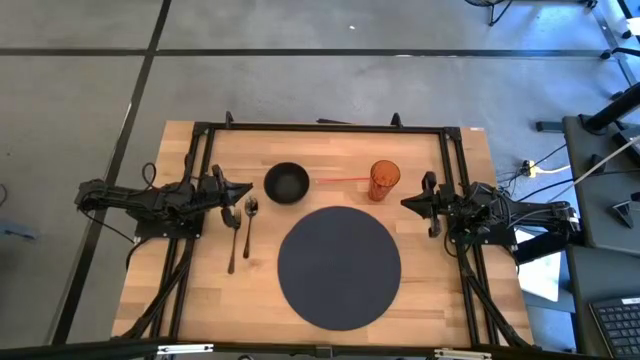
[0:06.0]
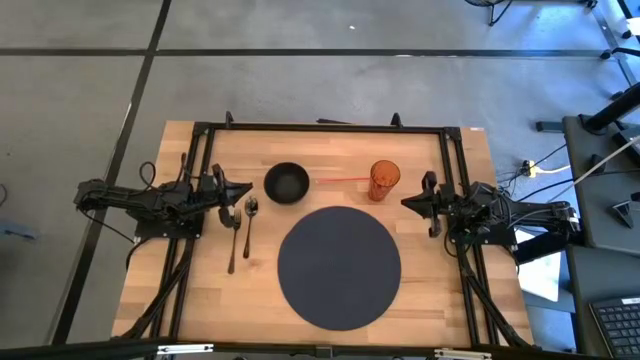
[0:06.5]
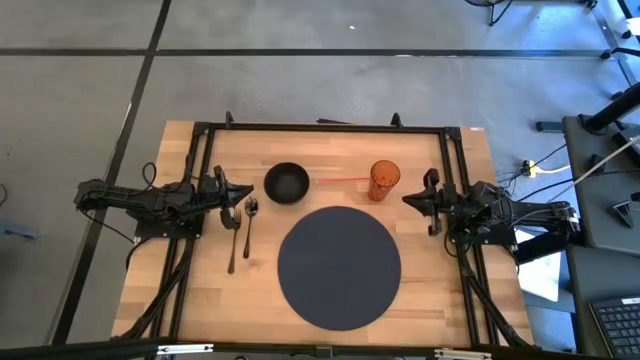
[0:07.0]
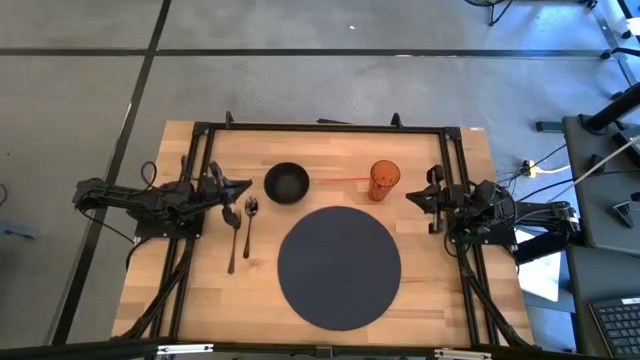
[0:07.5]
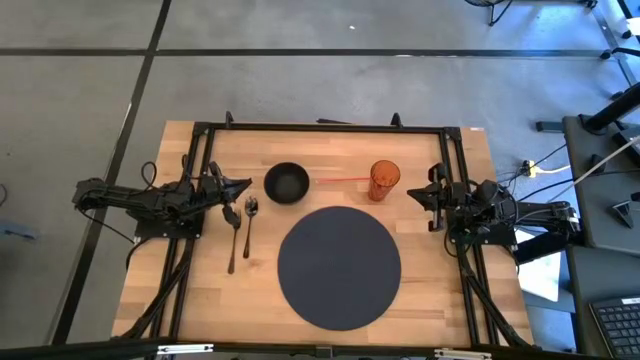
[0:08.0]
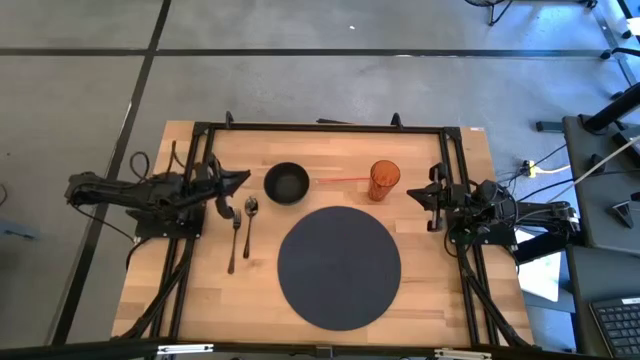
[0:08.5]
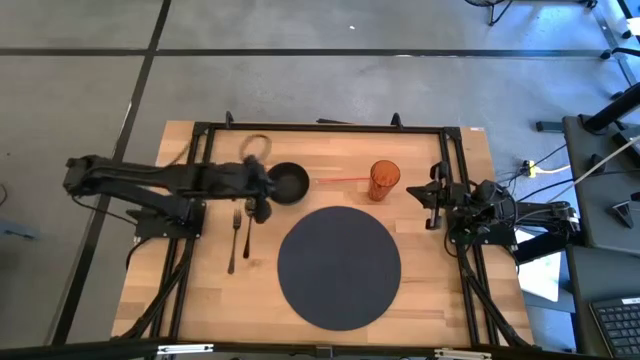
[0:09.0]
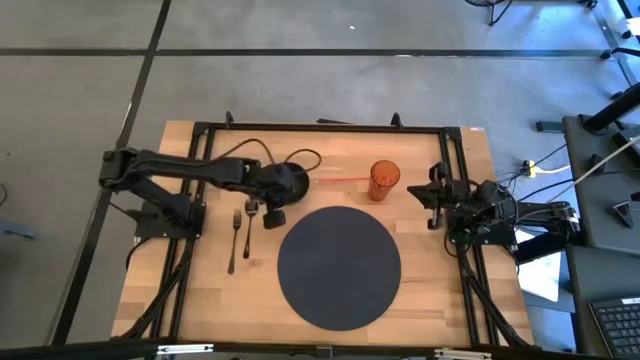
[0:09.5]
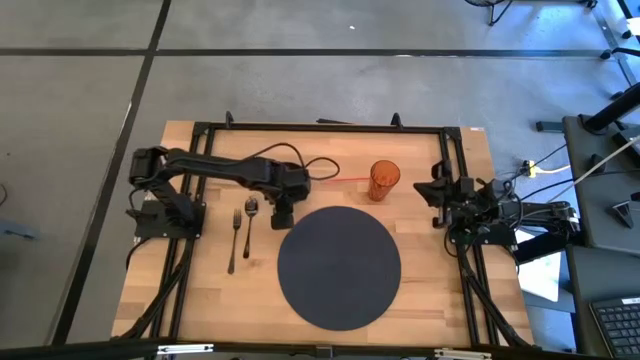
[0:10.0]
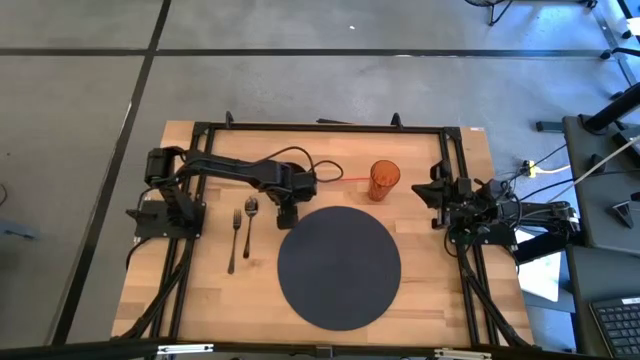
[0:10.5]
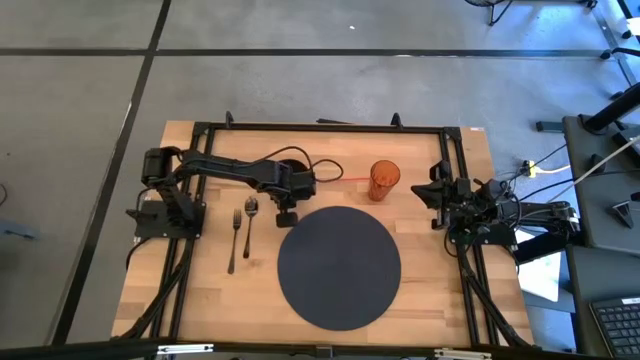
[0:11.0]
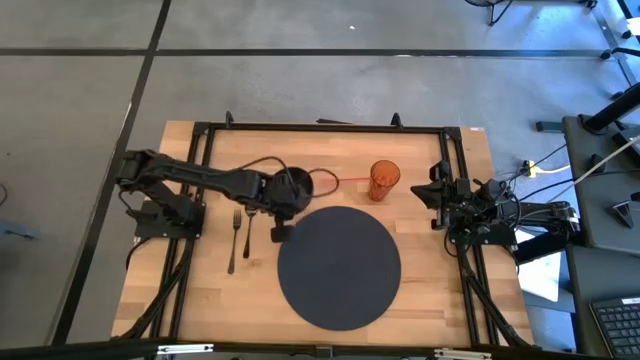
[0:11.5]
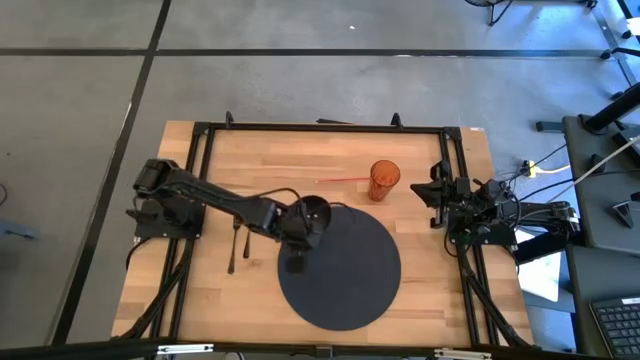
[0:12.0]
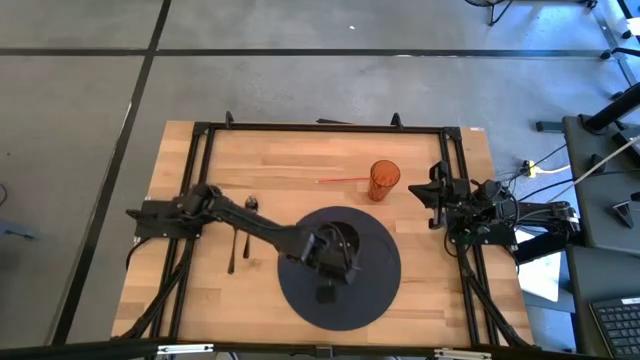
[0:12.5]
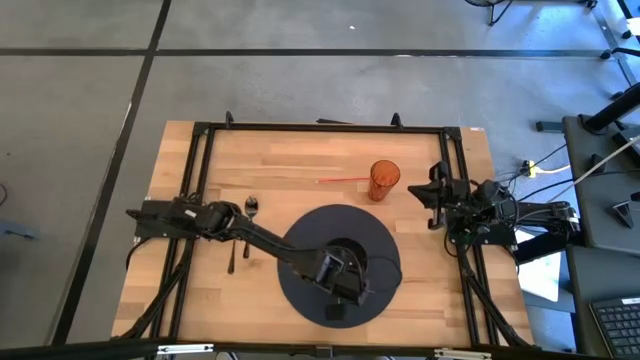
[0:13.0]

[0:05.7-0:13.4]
Task: Pick & Place Utensil
Put the black bowl on the blue mat

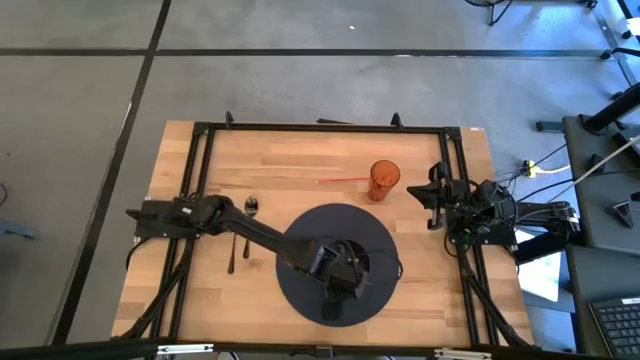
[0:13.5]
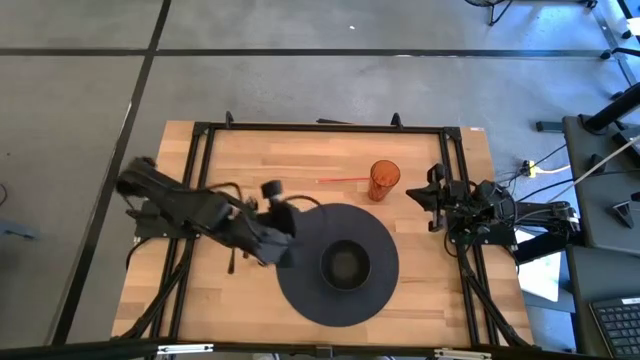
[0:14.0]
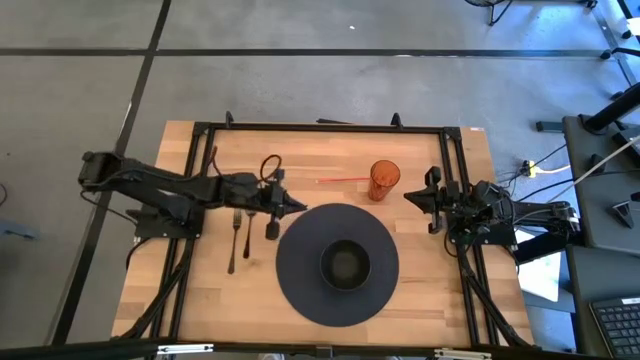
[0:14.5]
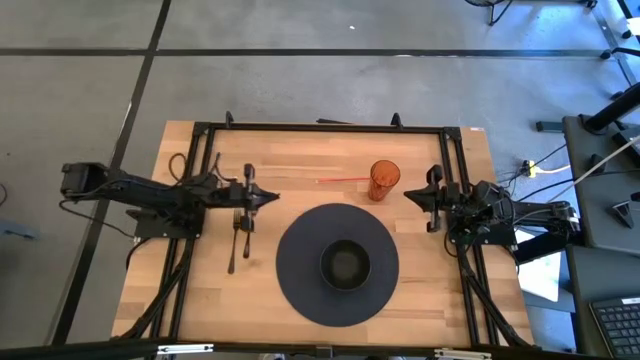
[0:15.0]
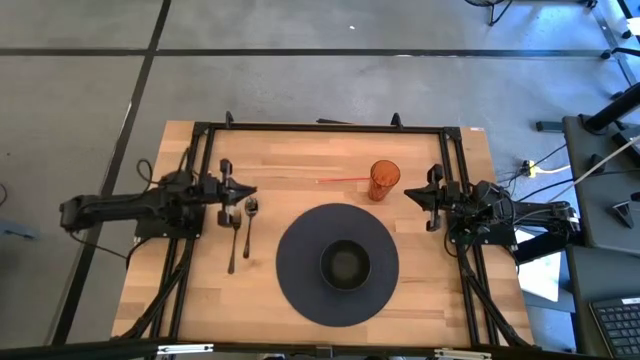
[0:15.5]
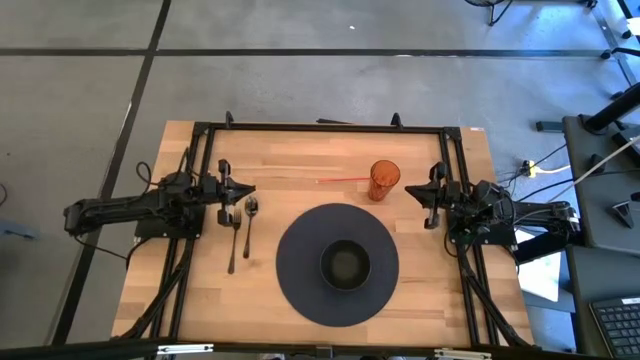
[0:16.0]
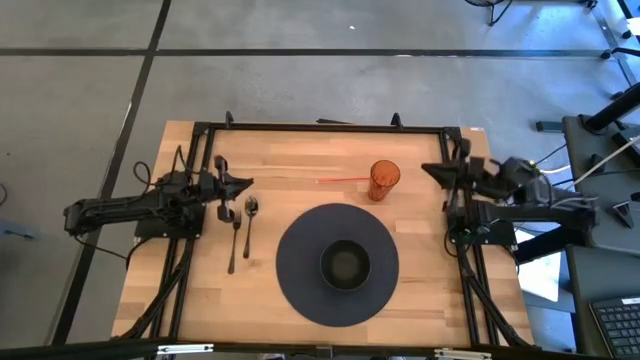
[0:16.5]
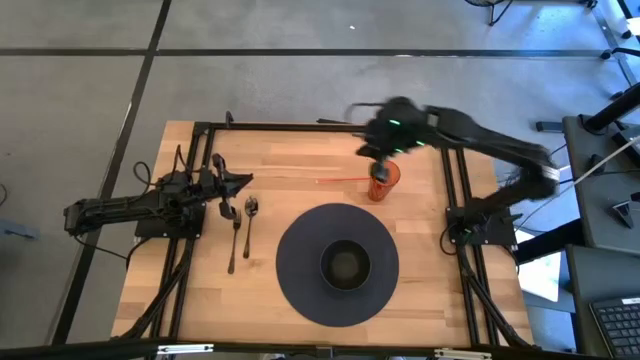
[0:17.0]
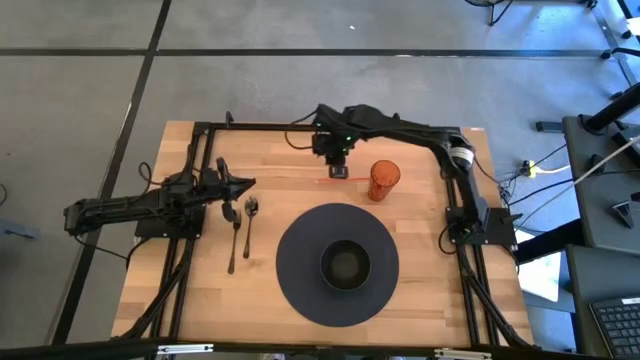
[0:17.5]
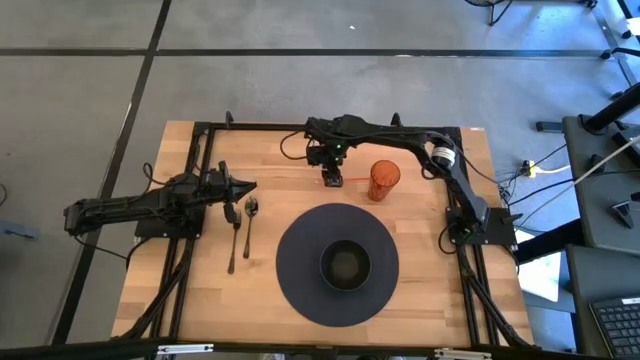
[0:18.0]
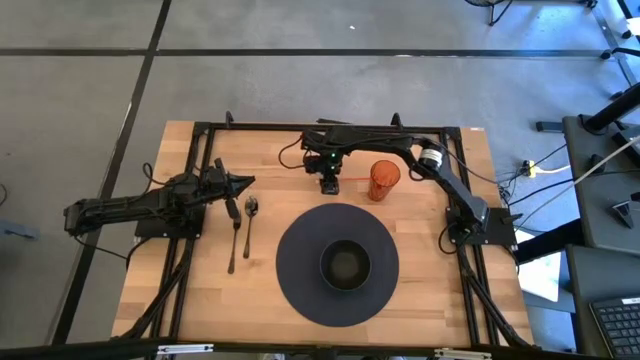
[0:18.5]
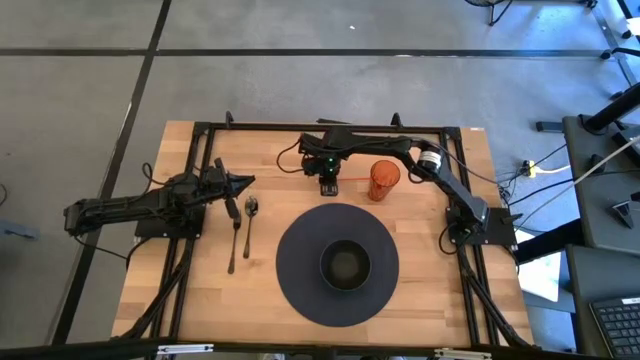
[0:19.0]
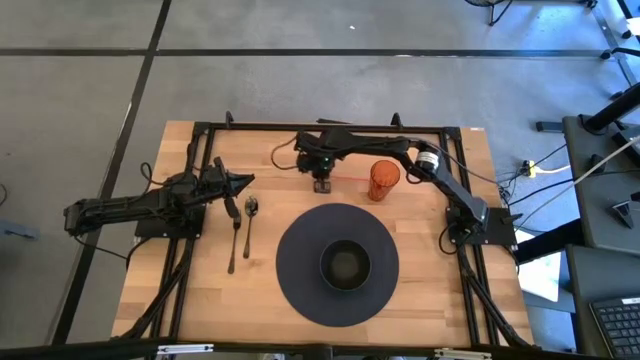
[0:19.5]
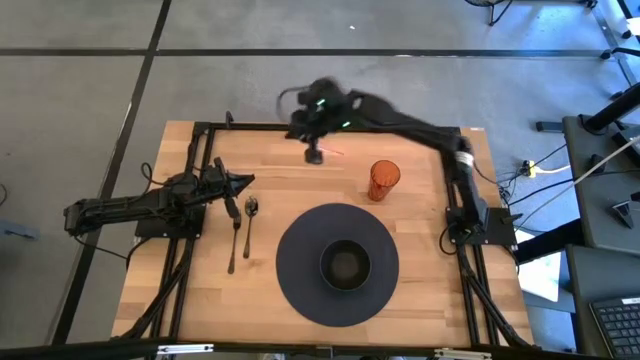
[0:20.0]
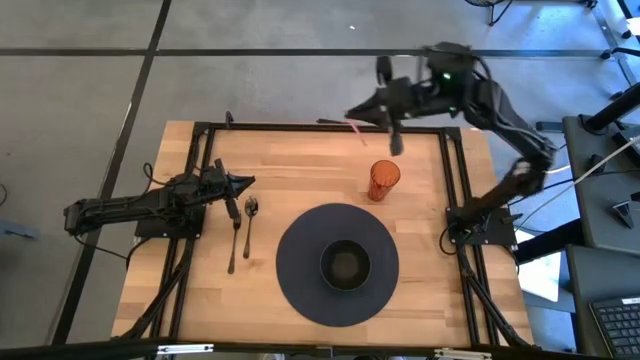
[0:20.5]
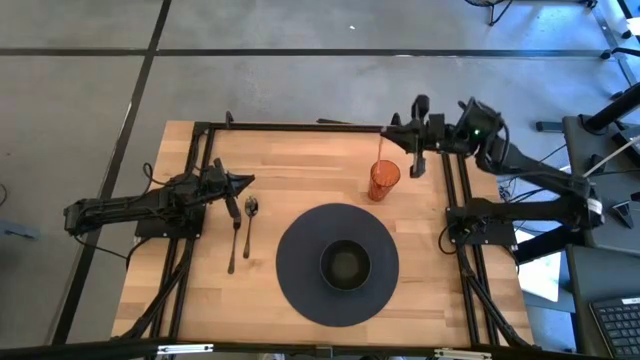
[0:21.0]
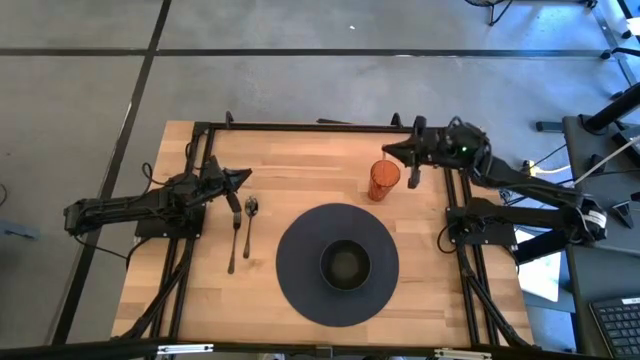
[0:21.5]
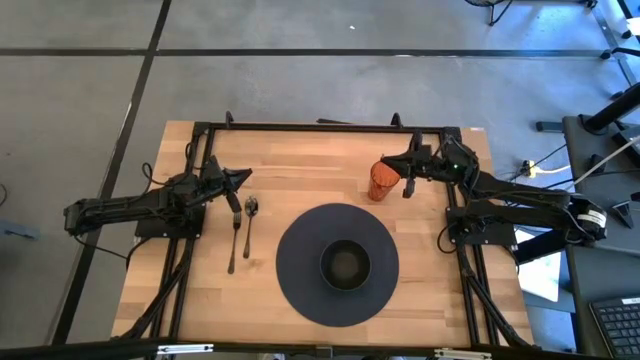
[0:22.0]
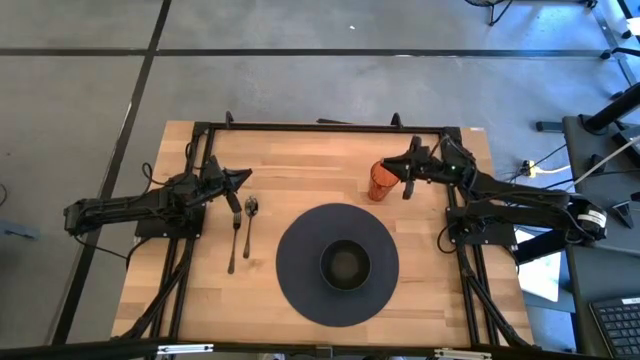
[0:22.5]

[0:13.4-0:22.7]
Put the orange straw into the orange cup

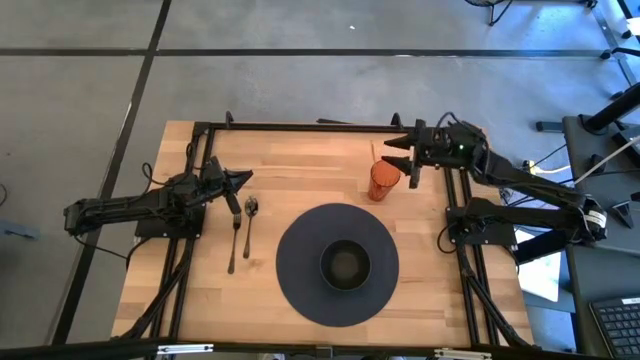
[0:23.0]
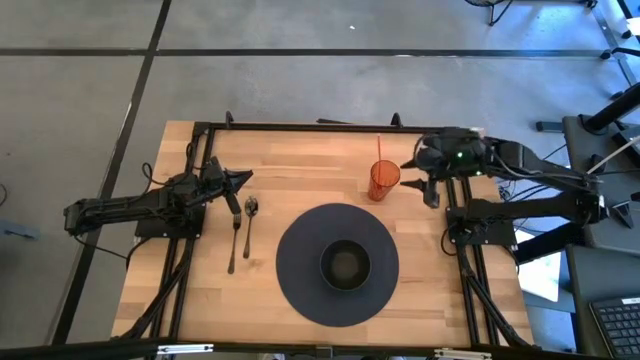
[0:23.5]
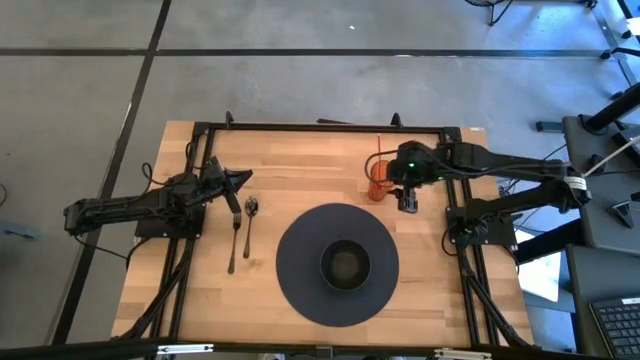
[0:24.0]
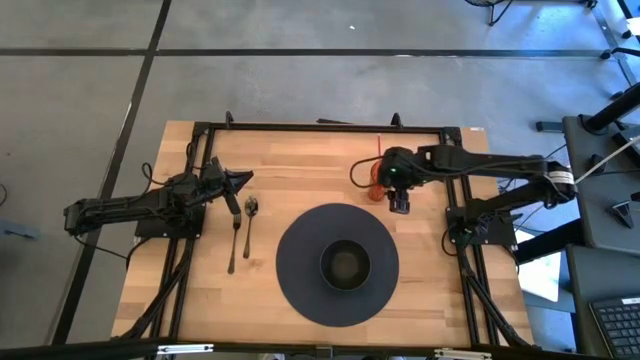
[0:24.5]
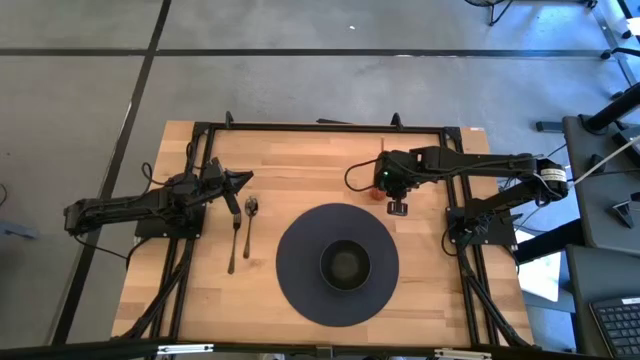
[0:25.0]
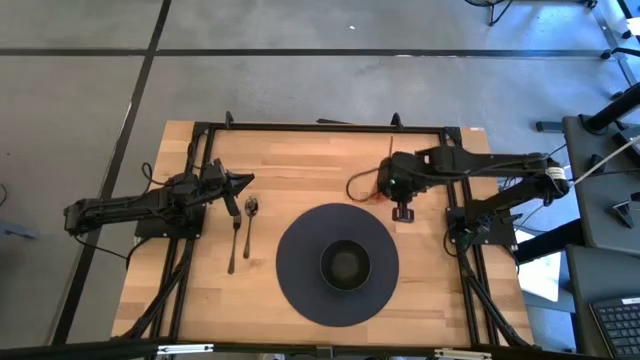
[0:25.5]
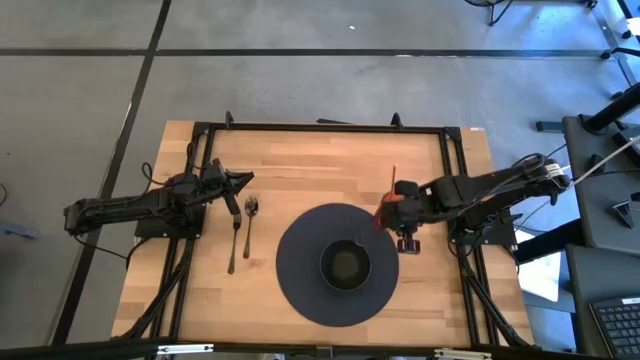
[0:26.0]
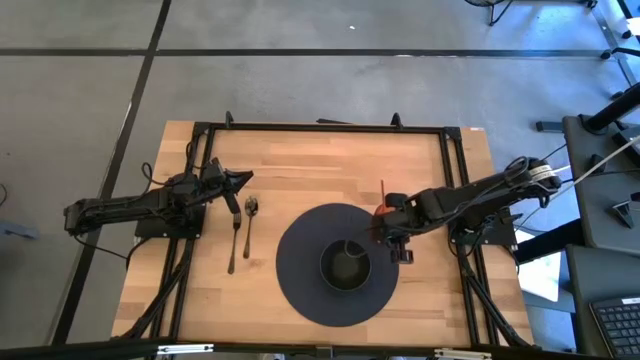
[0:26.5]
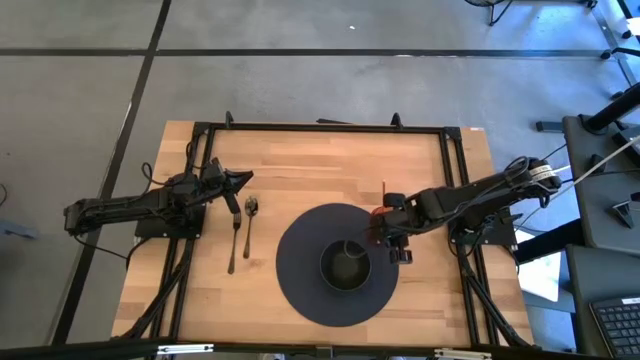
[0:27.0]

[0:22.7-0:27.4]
Put the orange cup on the blue mat to the top right of the black bowl
